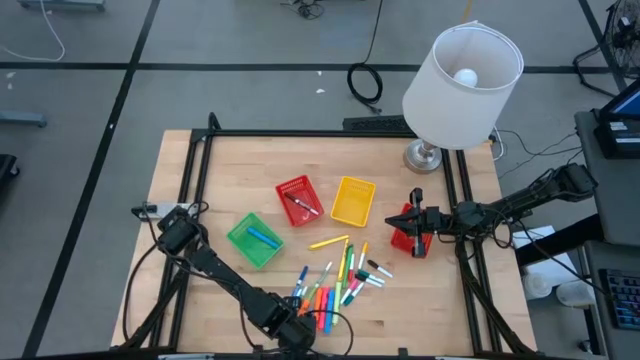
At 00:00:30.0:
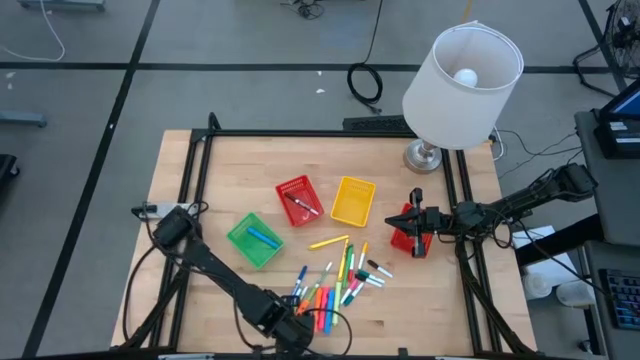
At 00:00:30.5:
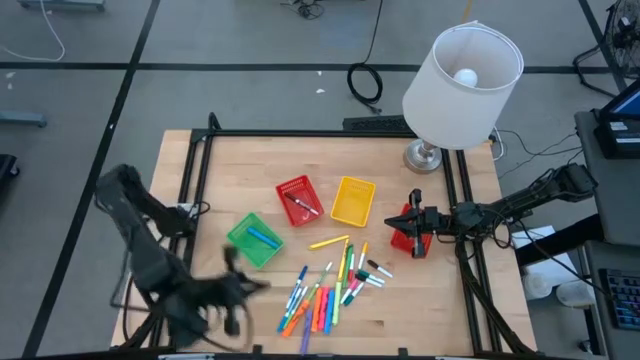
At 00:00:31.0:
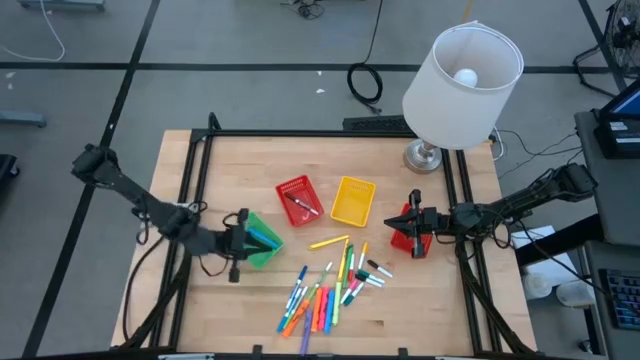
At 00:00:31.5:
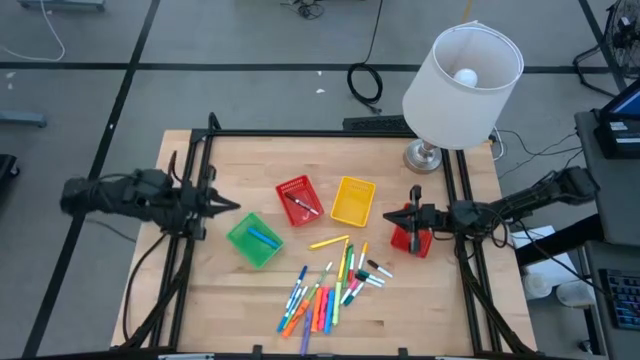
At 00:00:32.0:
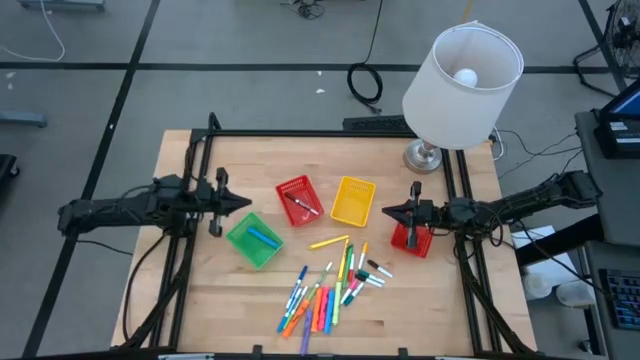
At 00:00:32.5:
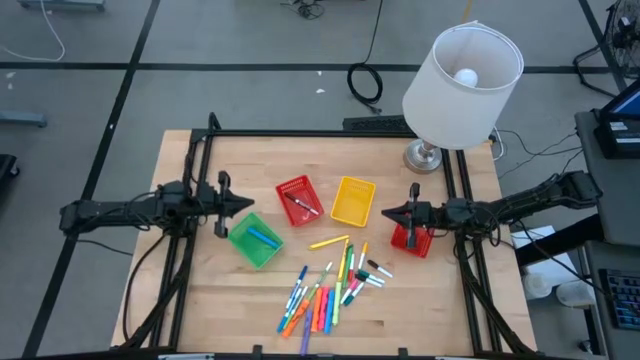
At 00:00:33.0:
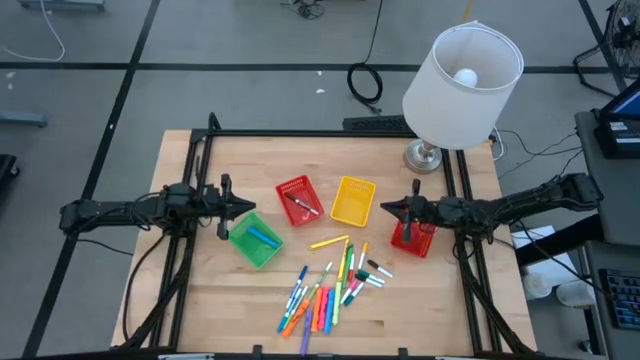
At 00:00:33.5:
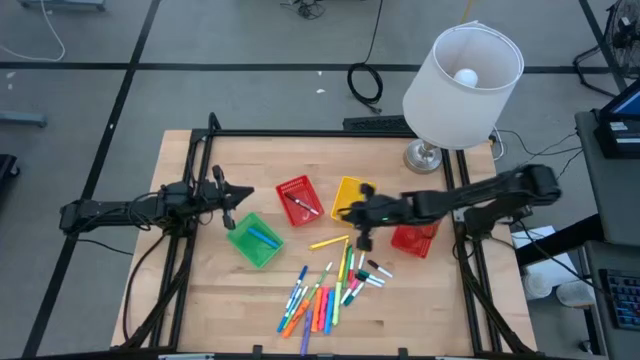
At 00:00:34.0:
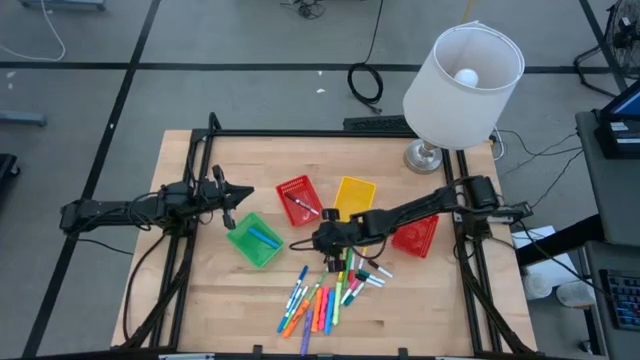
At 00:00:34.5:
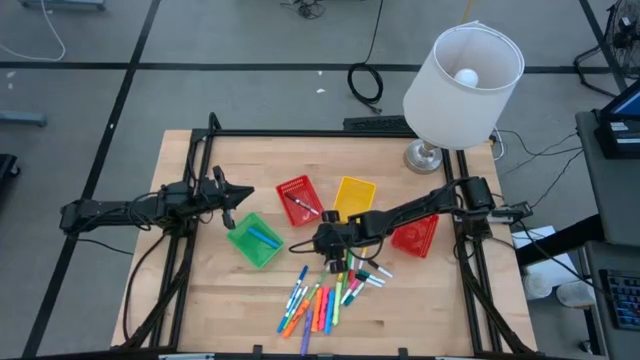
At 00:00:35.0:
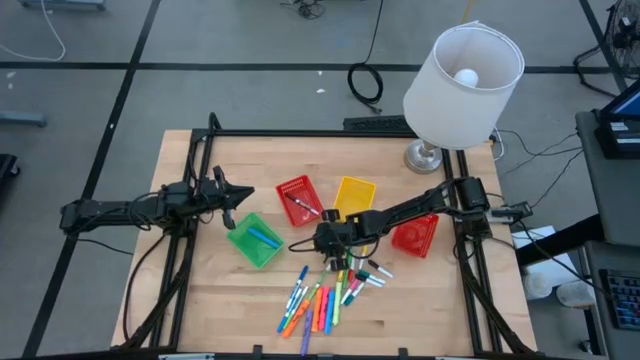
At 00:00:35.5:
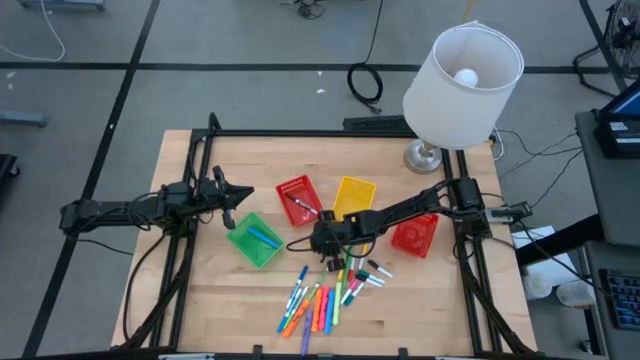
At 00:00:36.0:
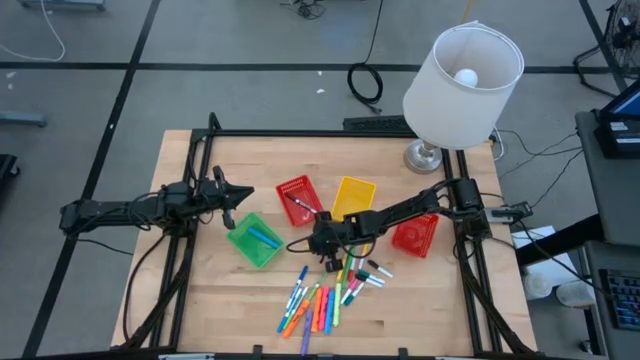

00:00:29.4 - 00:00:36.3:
Task: Pick & Place Markers
Put the top yellow pen into the yellow bin

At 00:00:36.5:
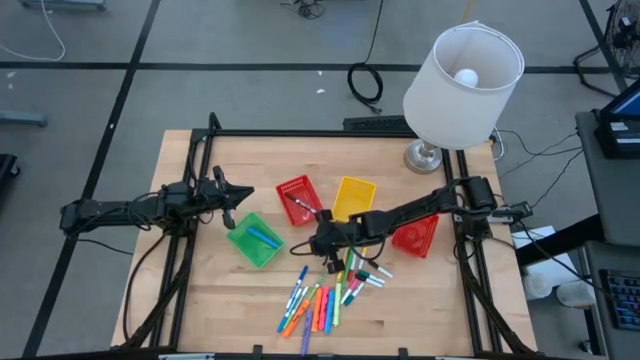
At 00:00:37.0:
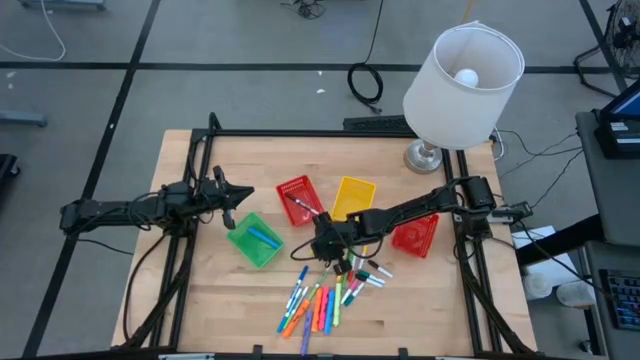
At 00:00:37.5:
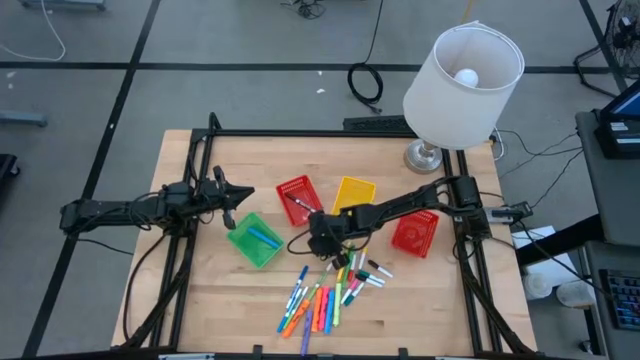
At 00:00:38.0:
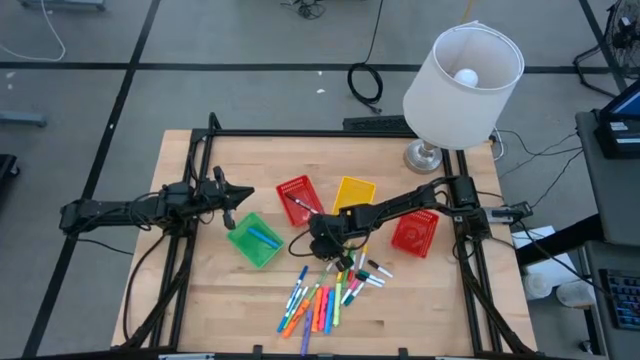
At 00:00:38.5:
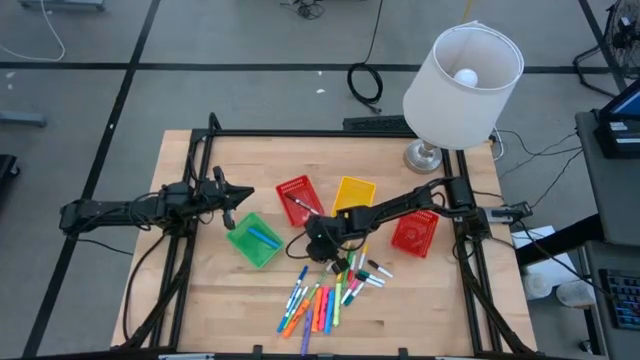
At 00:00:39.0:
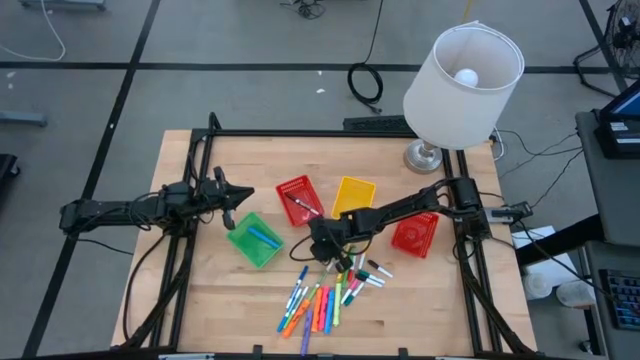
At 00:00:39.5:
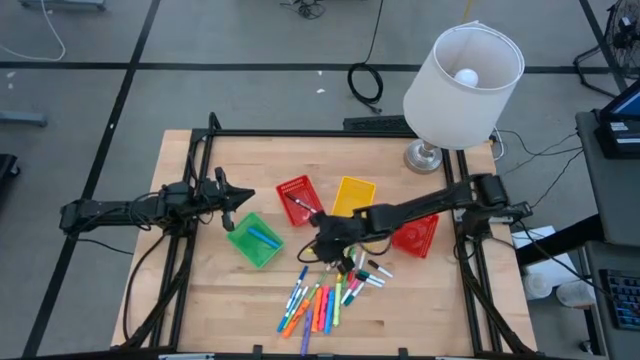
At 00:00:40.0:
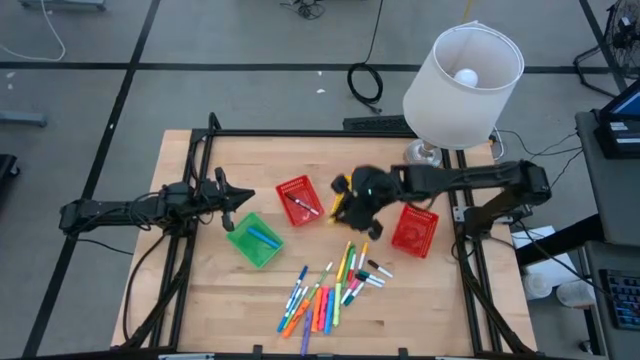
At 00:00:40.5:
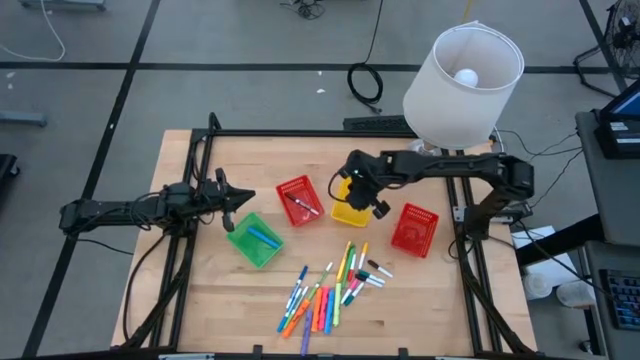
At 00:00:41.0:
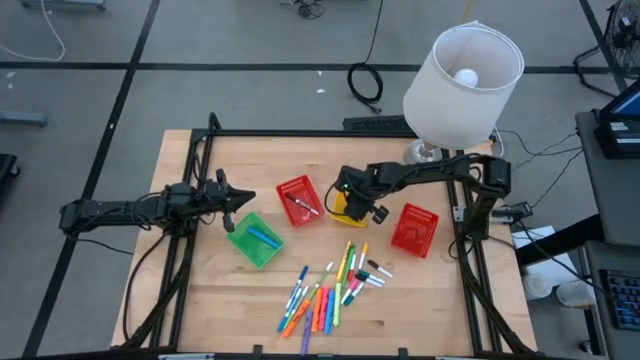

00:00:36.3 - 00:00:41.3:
Put the top yellow pen into the yellow bin

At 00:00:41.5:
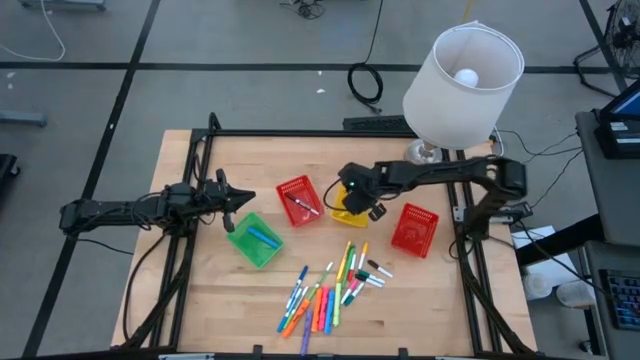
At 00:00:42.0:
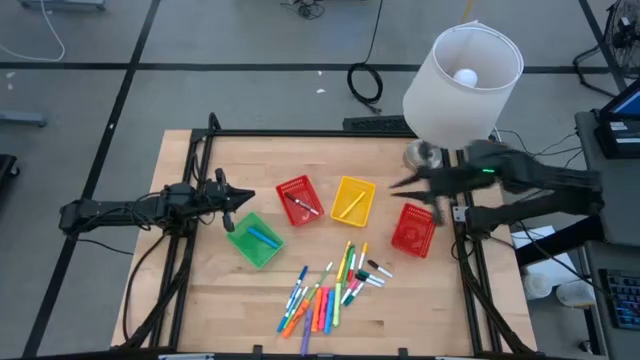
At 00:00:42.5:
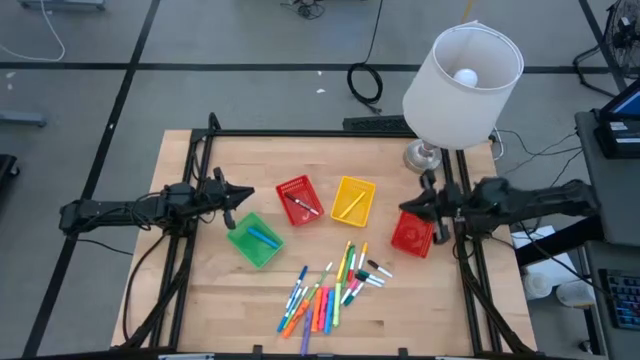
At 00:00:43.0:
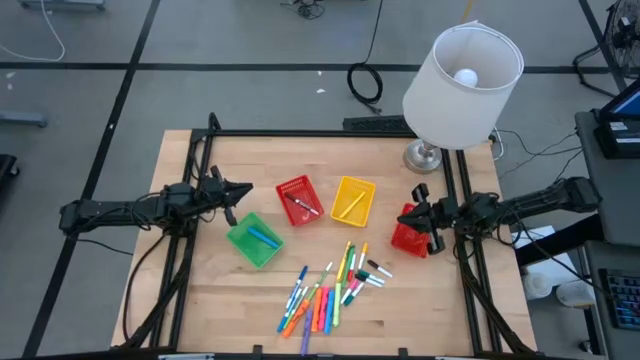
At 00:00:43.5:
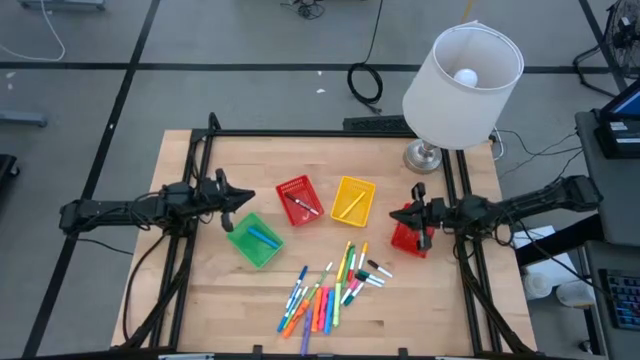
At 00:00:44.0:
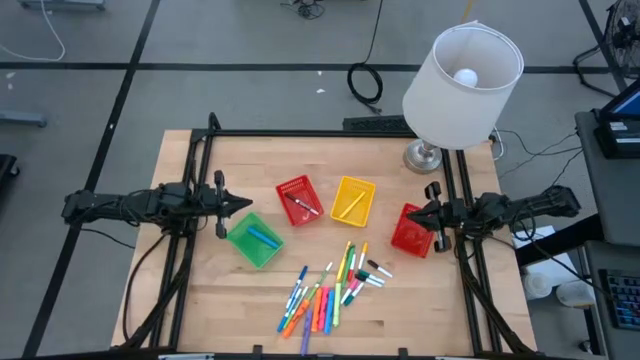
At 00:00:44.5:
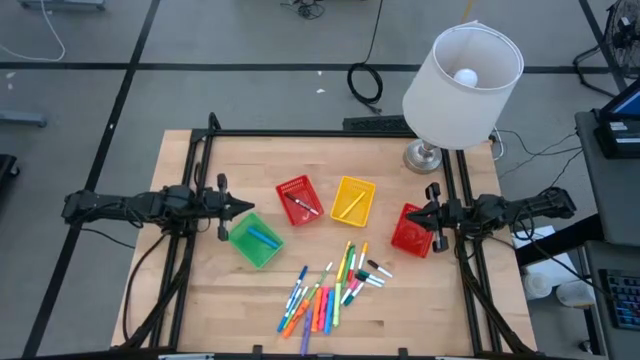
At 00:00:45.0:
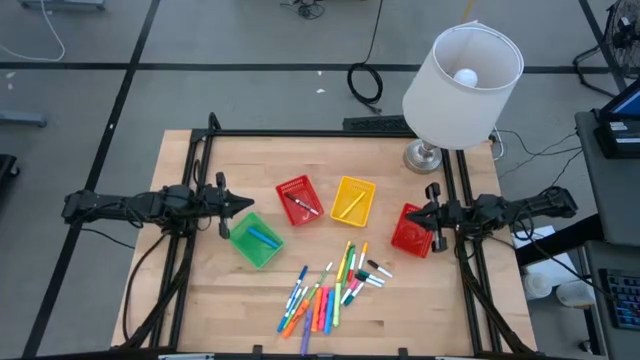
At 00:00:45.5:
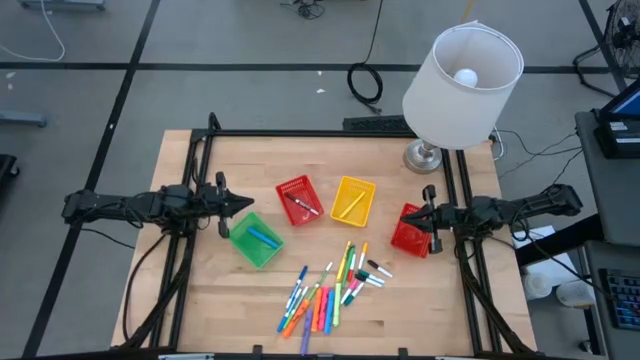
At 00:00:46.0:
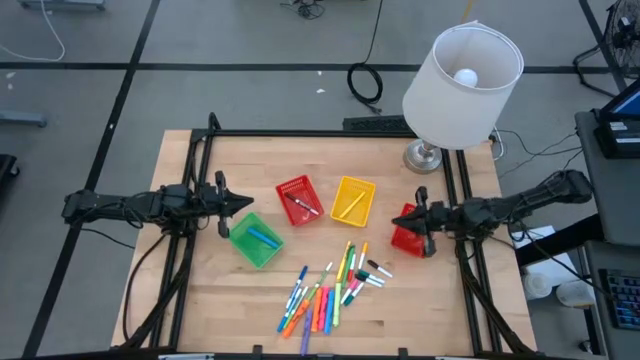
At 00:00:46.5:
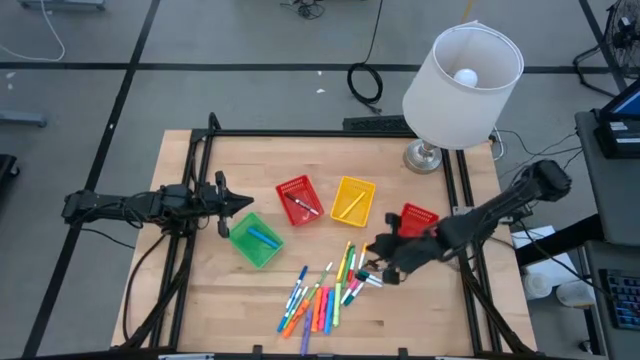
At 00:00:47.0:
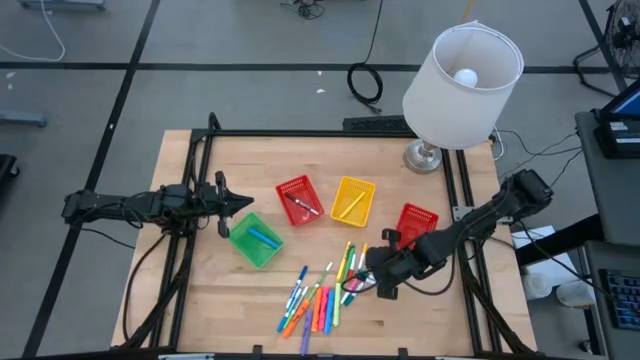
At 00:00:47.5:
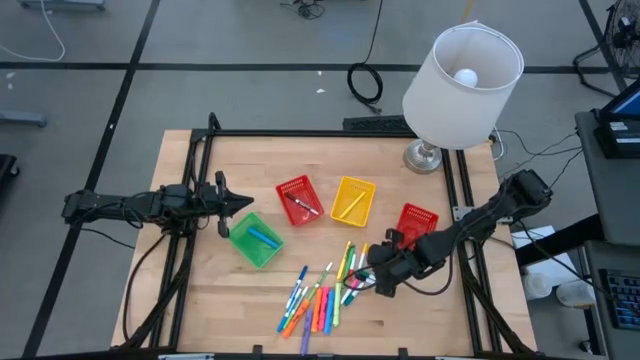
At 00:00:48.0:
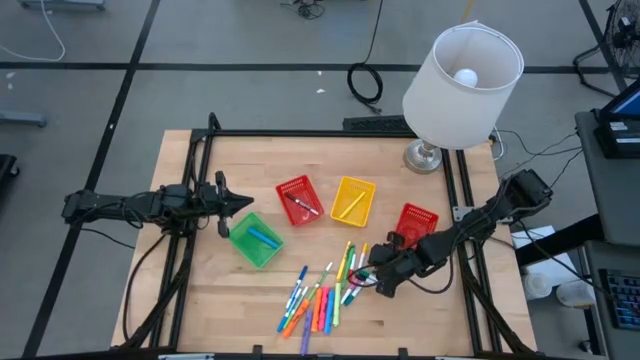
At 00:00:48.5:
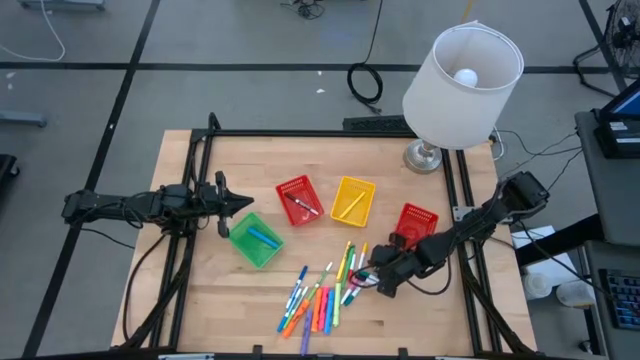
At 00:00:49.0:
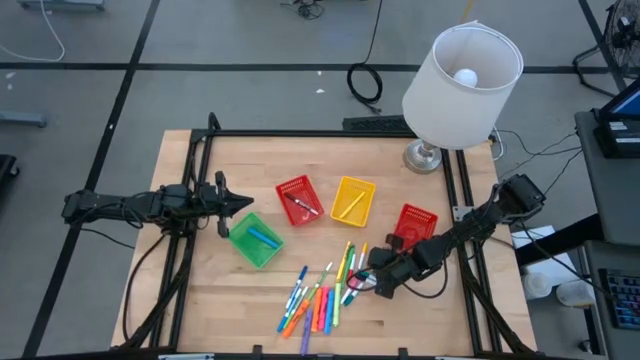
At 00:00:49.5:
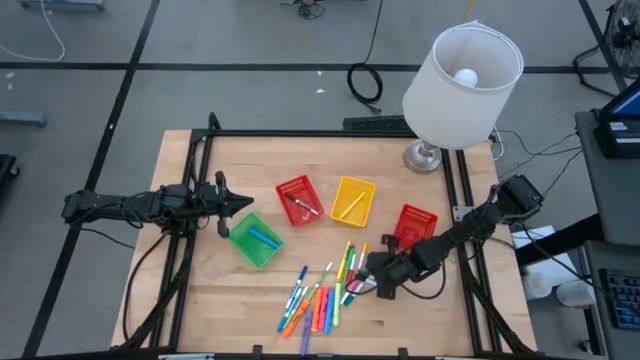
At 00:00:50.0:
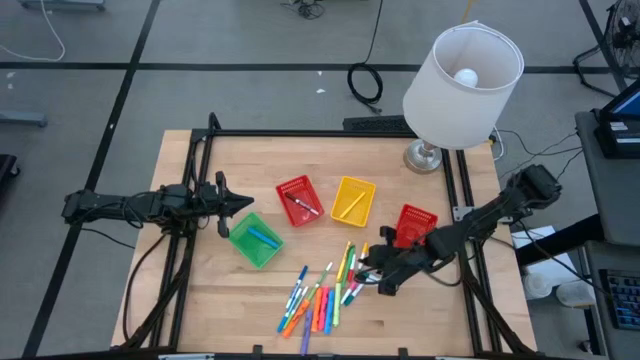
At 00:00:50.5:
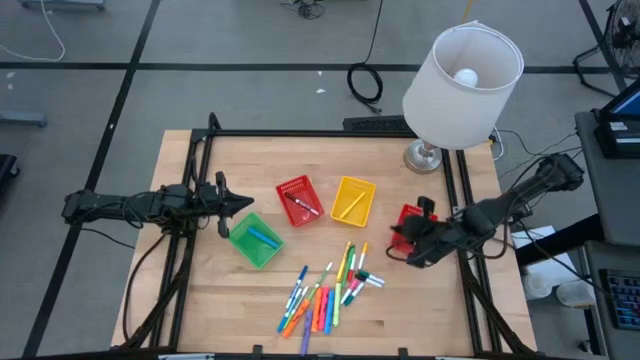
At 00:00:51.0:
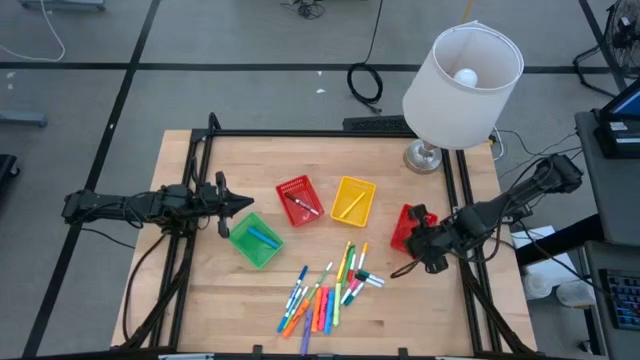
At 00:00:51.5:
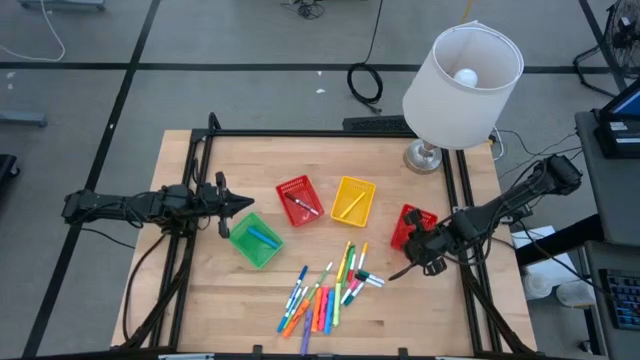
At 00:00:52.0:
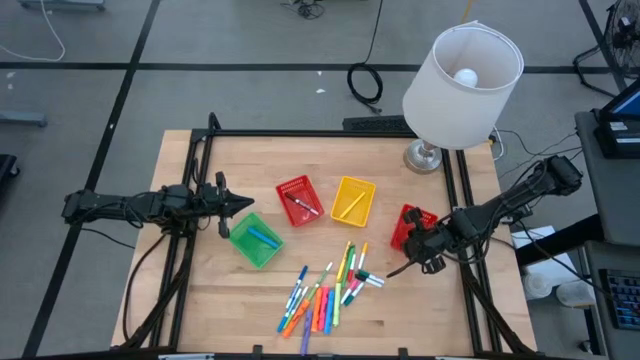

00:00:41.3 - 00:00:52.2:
Put the black marker into the right red bin
